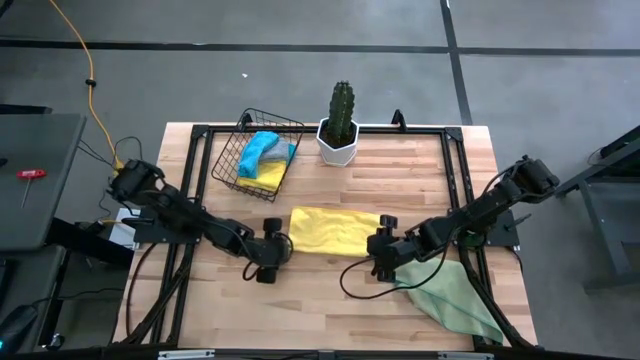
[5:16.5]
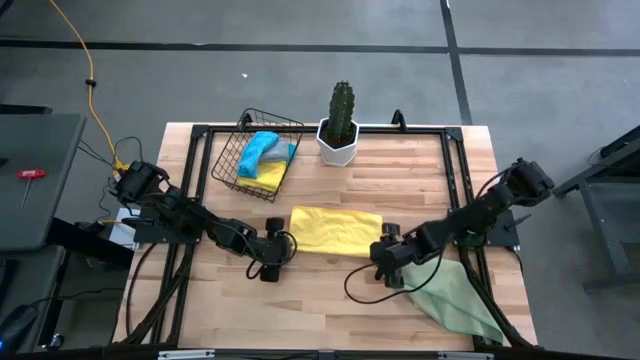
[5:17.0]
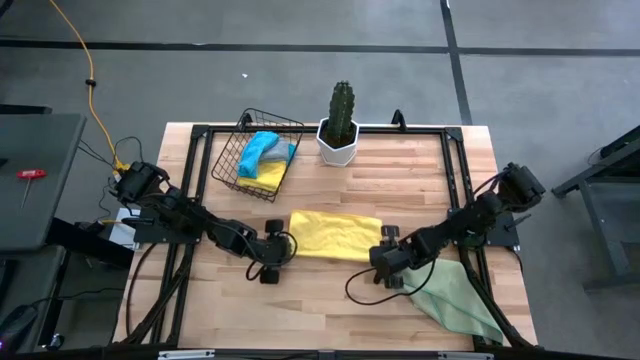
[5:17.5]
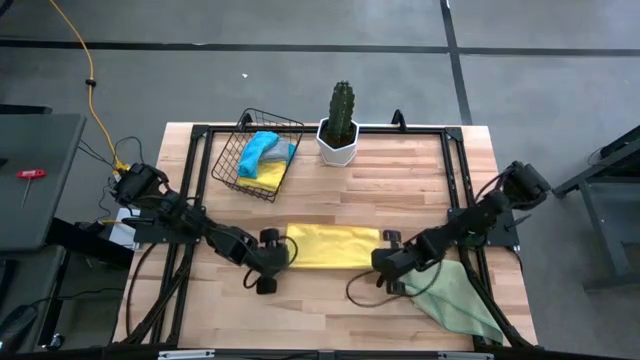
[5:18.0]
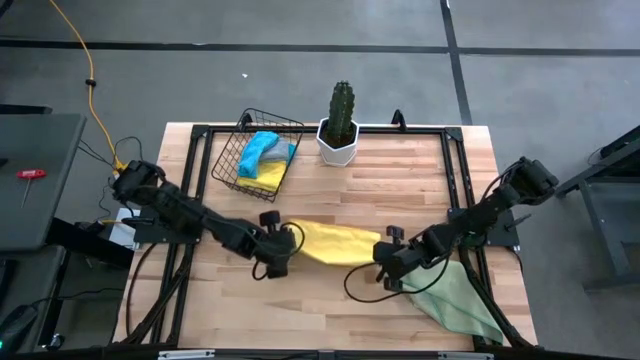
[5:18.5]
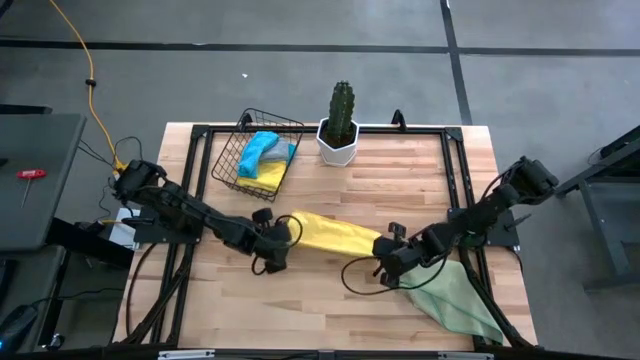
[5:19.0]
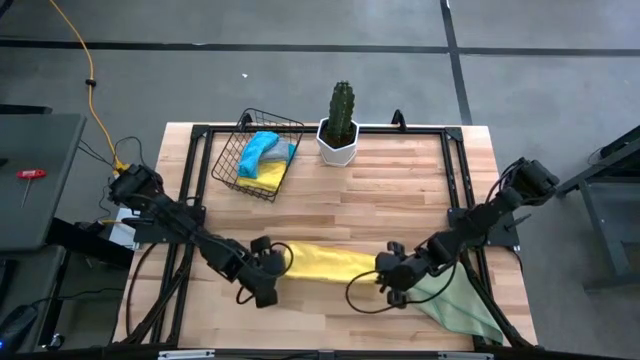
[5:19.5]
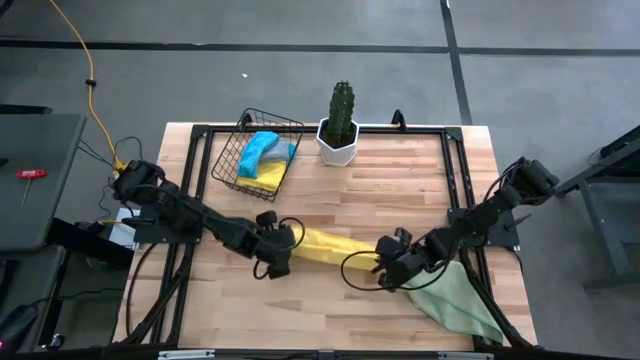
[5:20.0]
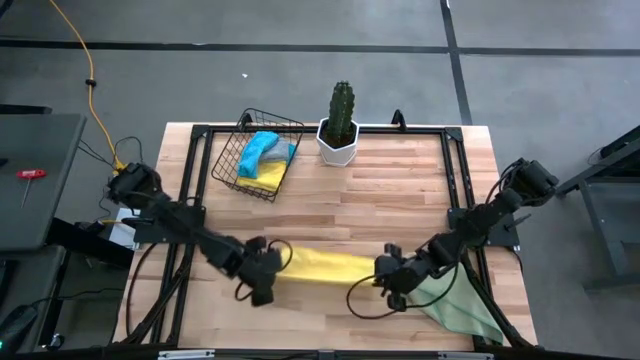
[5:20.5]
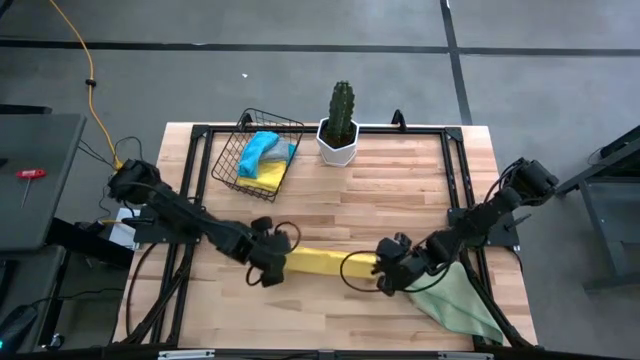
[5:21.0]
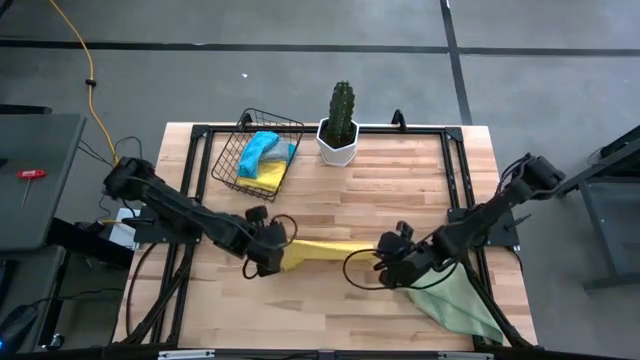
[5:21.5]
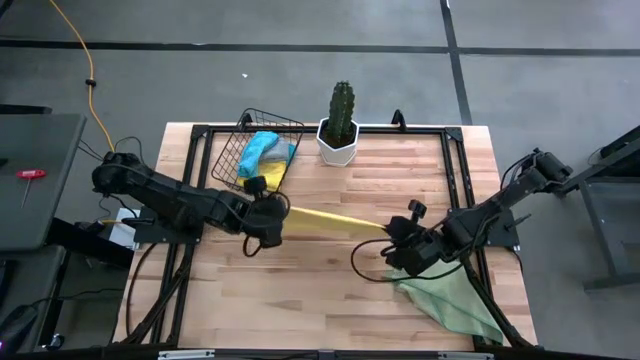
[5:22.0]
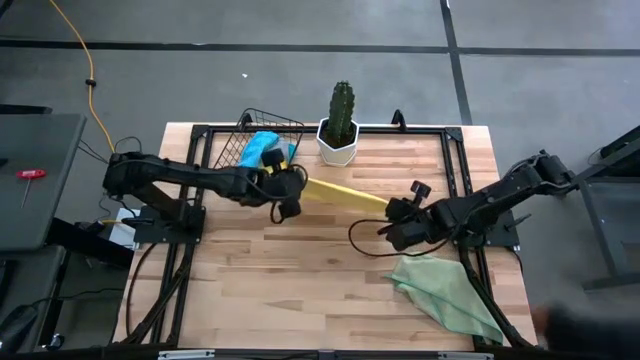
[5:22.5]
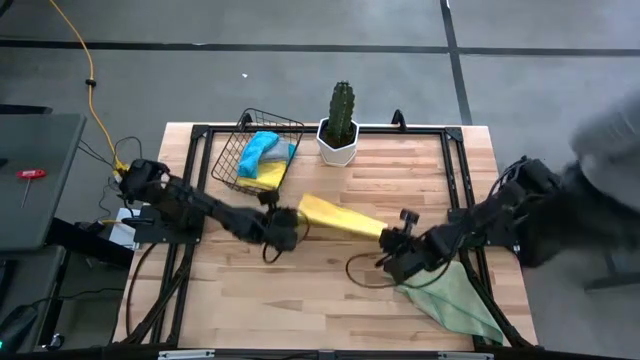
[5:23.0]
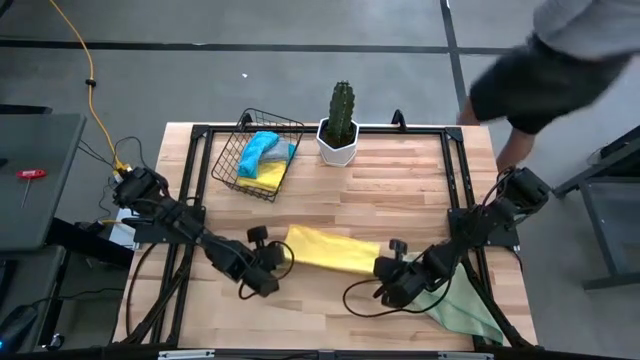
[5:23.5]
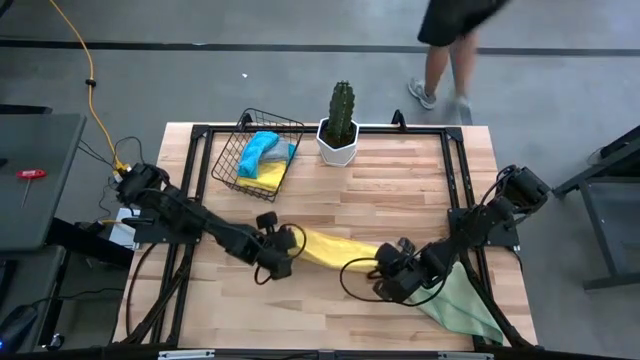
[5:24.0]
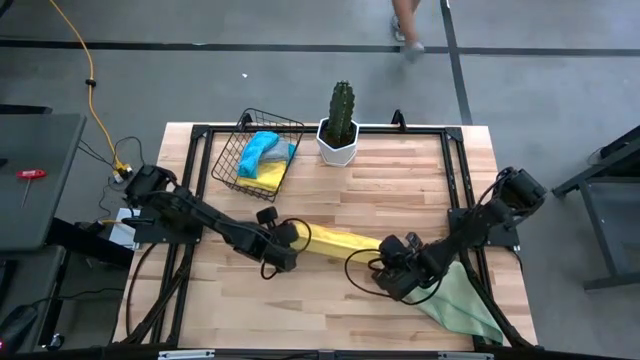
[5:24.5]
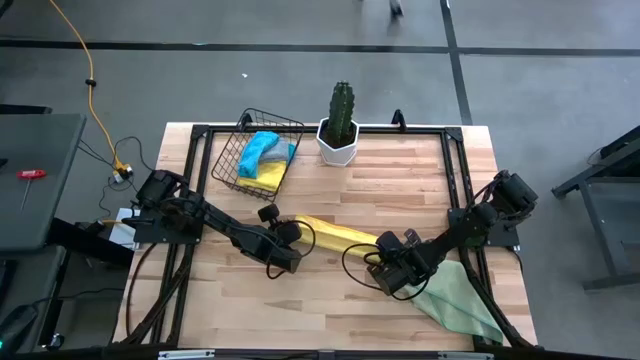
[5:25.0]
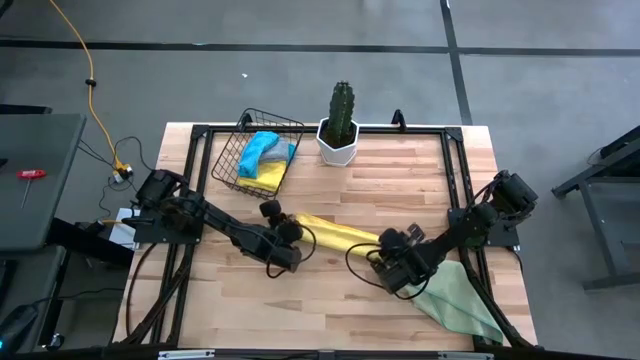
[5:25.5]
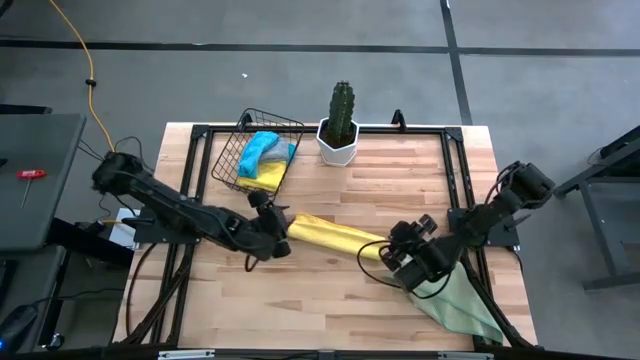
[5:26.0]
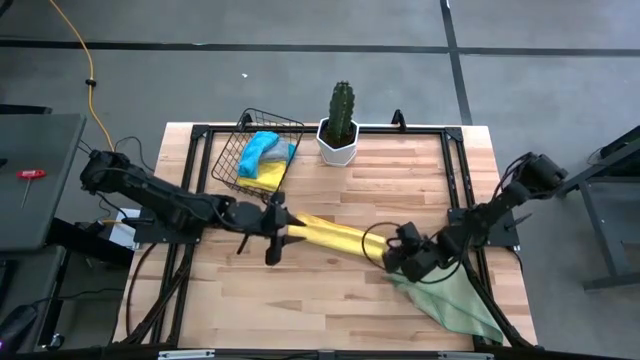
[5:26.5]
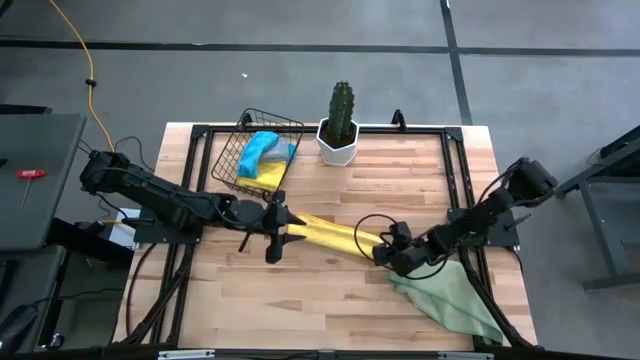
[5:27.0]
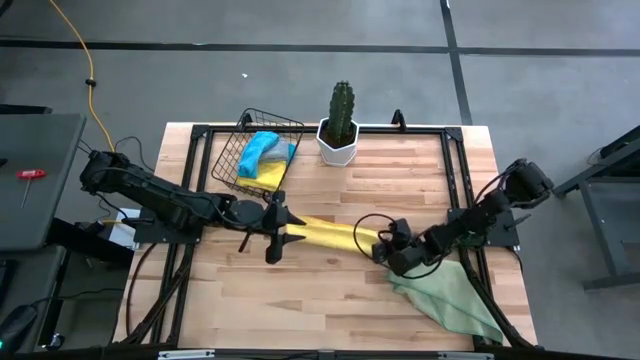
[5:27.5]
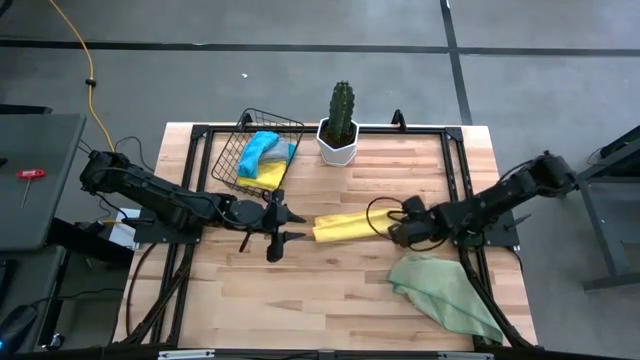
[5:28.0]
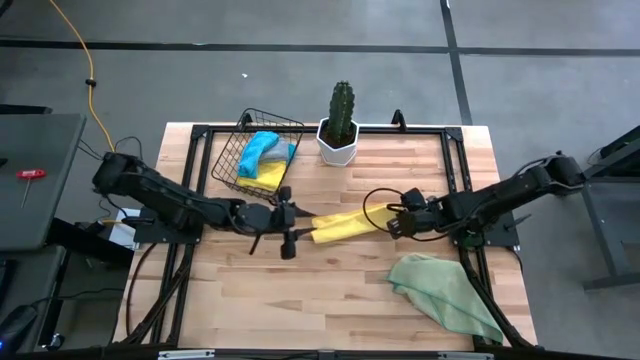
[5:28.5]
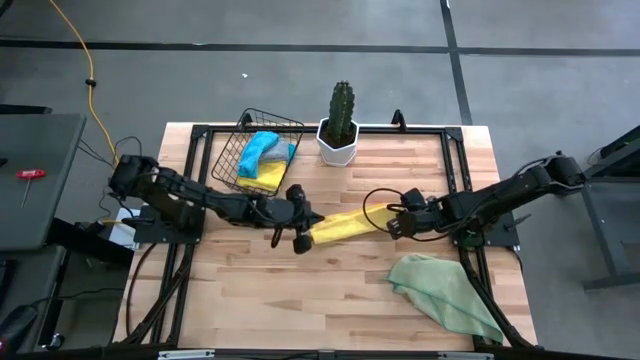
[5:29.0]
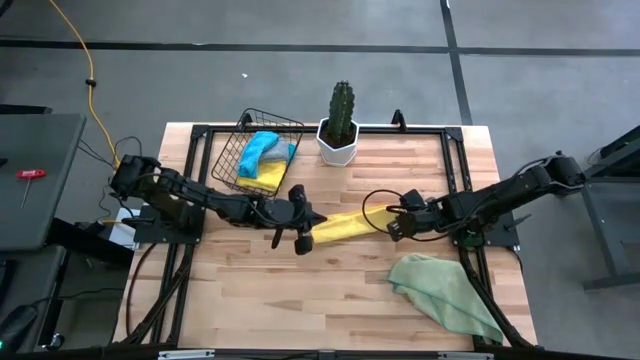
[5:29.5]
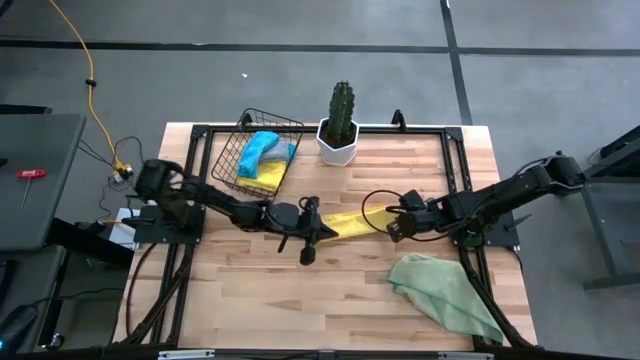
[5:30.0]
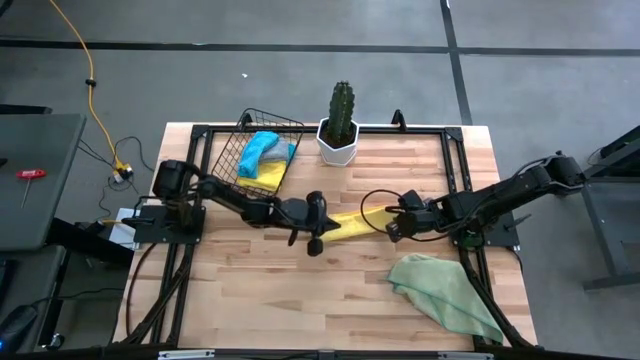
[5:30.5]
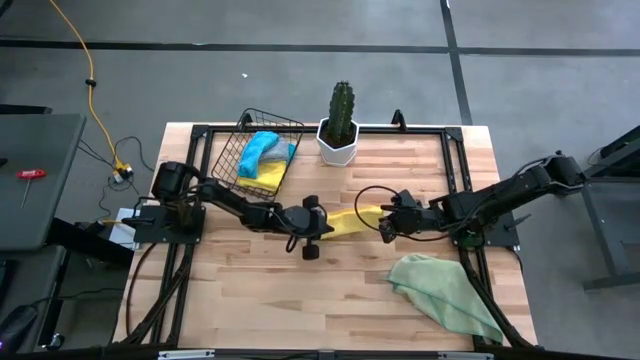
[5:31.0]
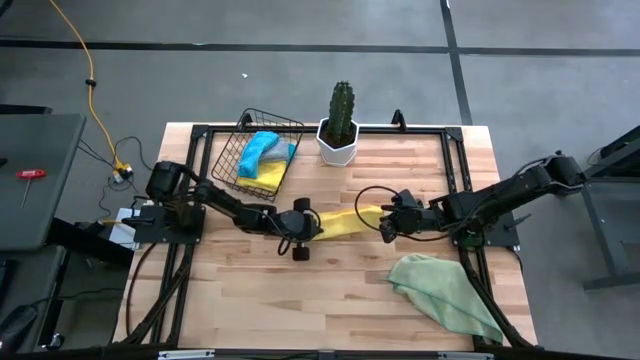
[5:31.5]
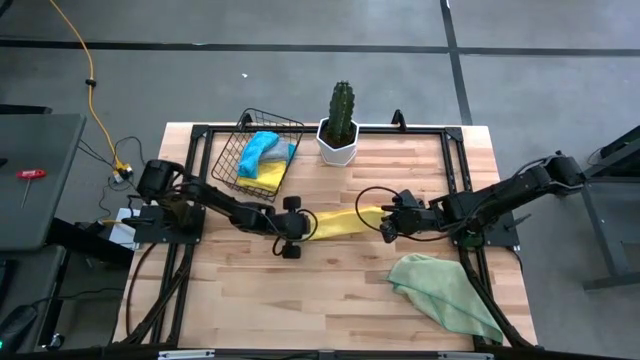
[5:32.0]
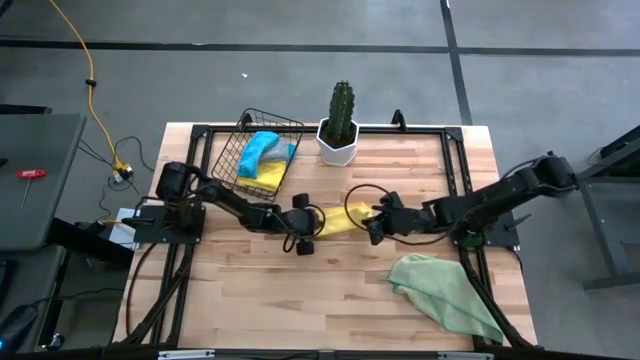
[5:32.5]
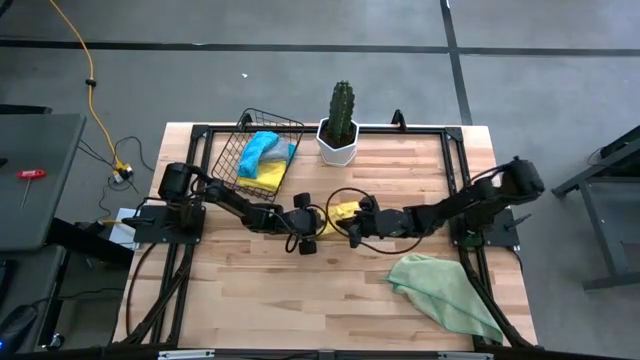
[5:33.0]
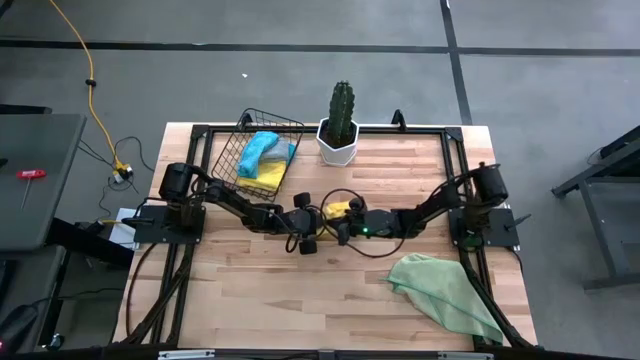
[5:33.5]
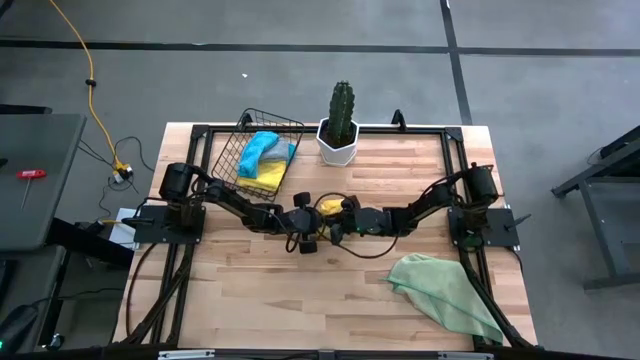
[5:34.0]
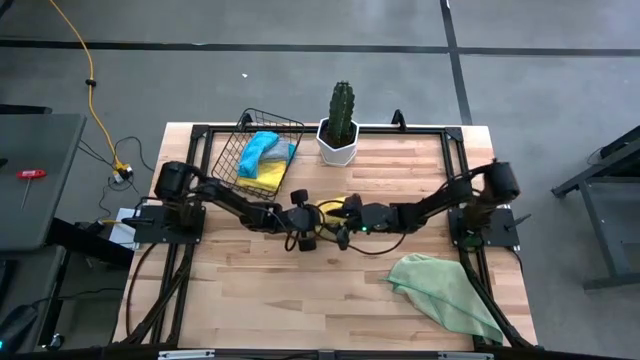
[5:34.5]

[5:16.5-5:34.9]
Task: Fold microfiber towels
Fold the yellow microfiber towel on the table

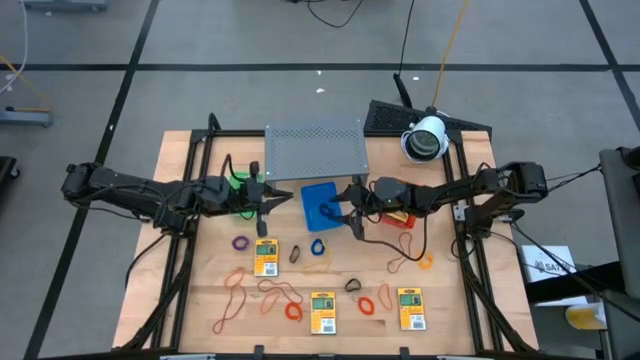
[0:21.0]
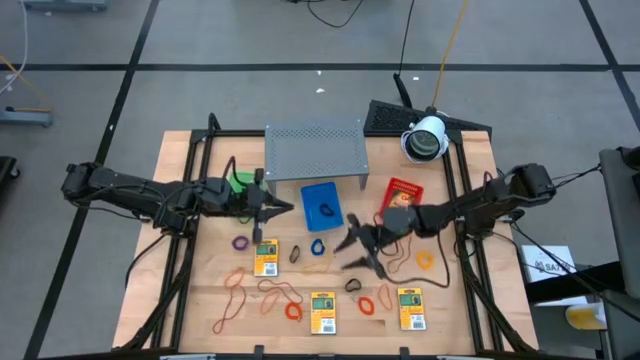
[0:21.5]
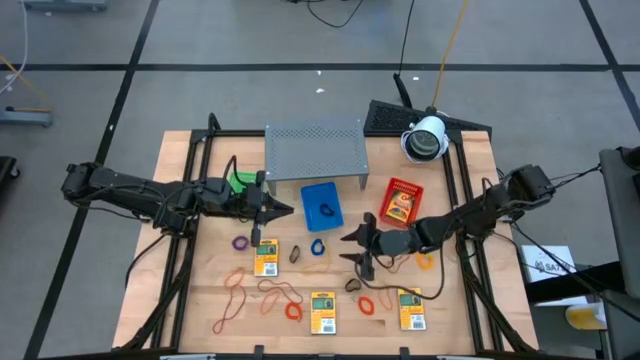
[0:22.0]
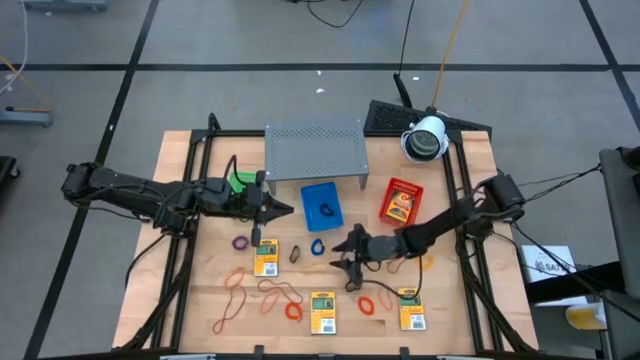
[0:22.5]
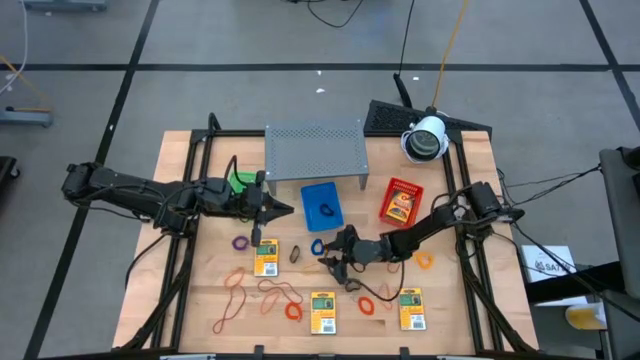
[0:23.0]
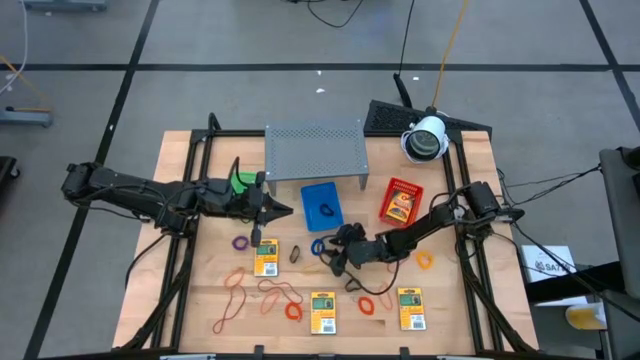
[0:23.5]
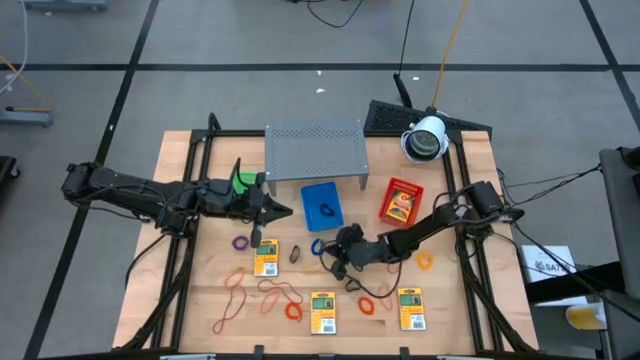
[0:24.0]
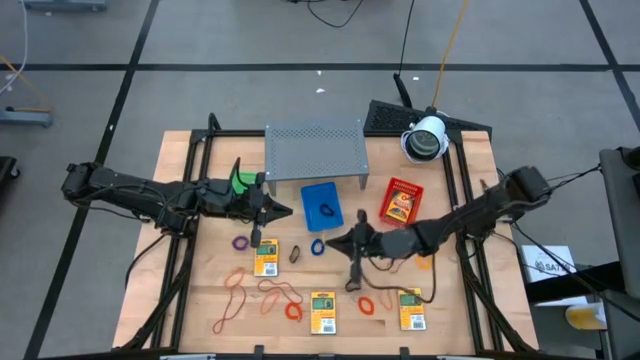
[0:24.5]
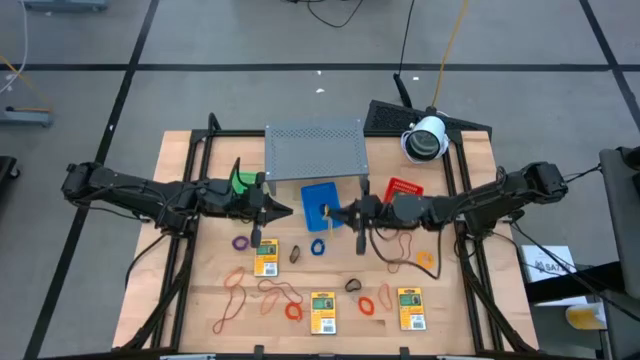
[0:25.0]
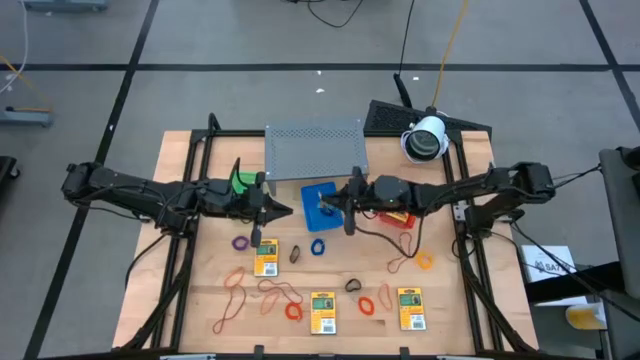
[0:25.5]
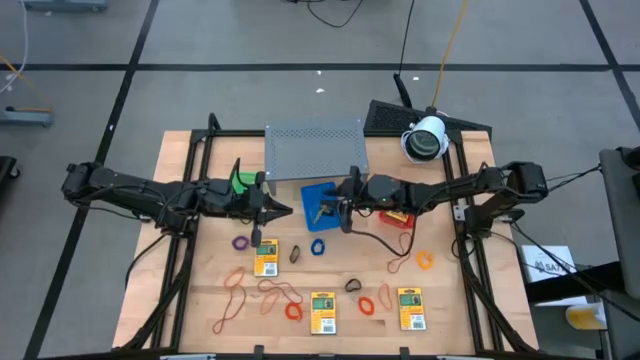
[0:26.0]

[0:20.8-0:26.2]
Task: Pick & Place Office Desk Supplies
Put the yellow rubber band into the blue bin
